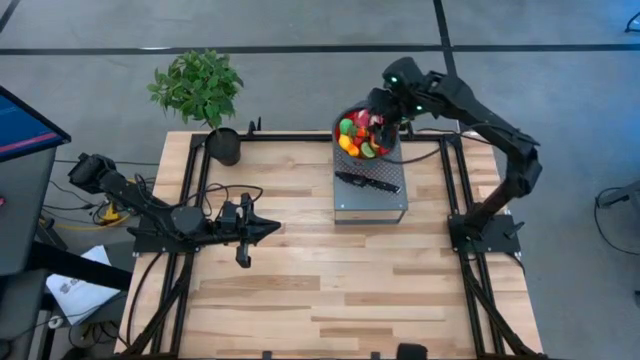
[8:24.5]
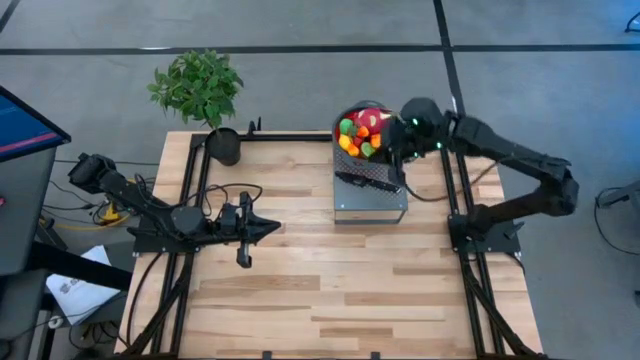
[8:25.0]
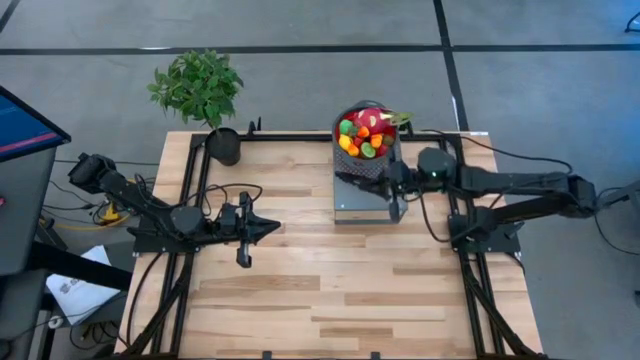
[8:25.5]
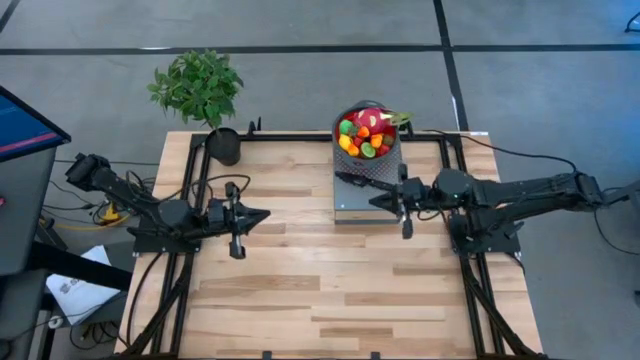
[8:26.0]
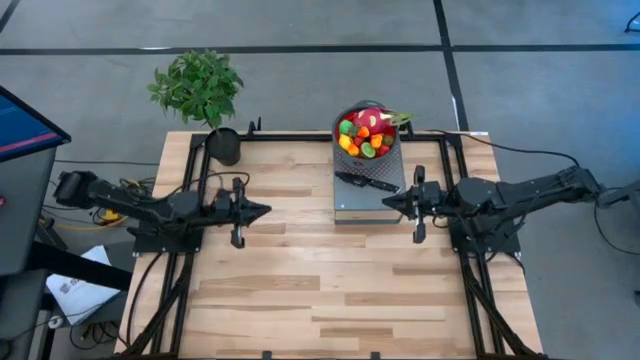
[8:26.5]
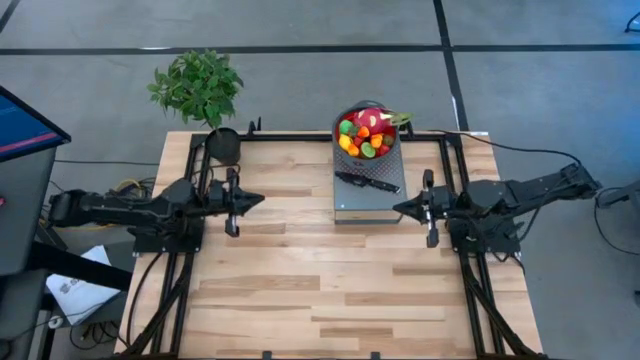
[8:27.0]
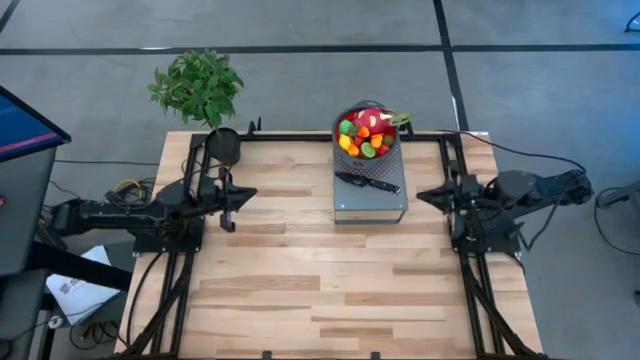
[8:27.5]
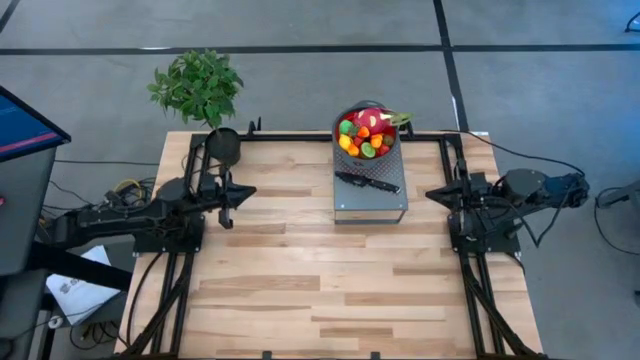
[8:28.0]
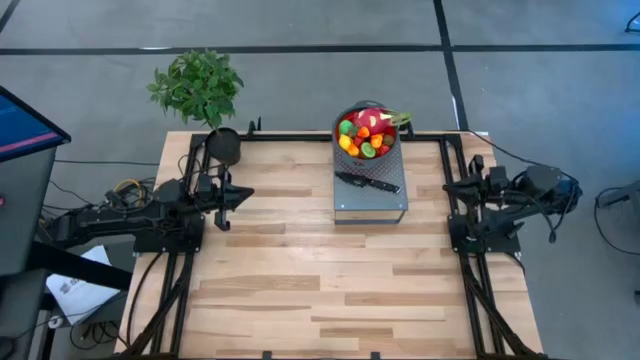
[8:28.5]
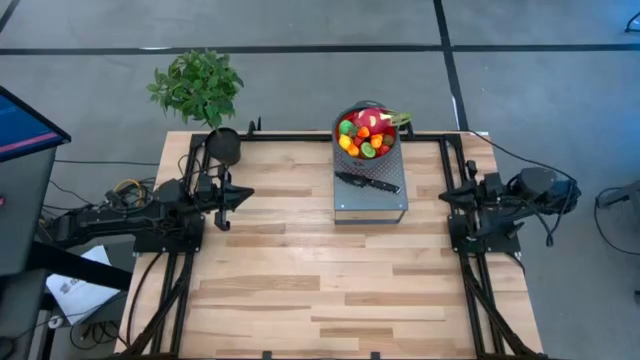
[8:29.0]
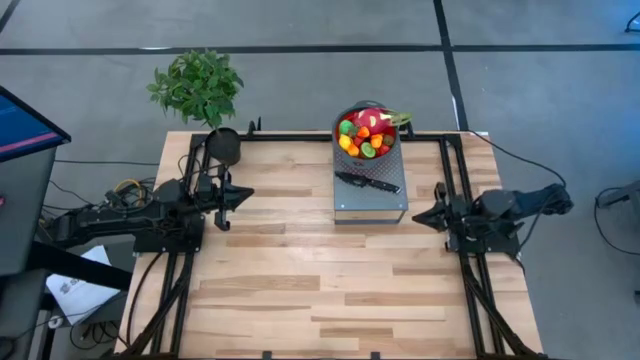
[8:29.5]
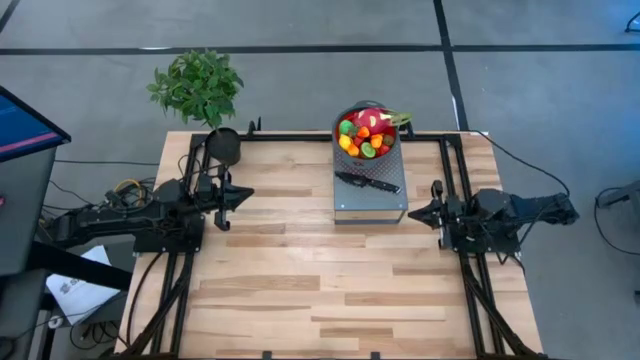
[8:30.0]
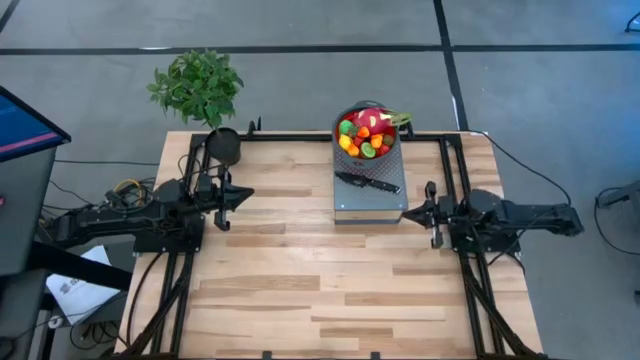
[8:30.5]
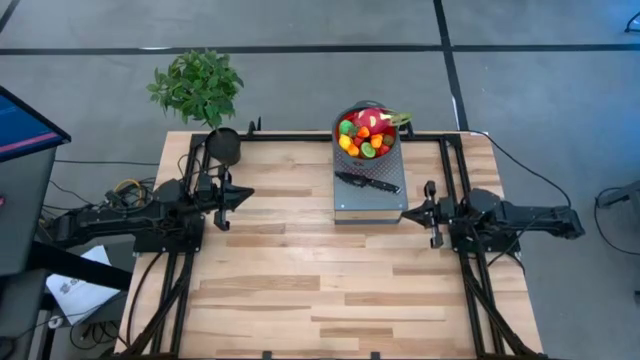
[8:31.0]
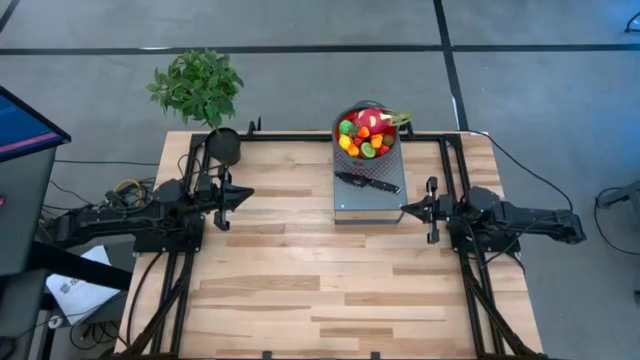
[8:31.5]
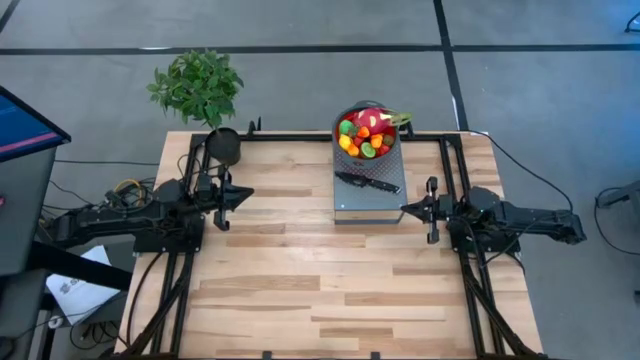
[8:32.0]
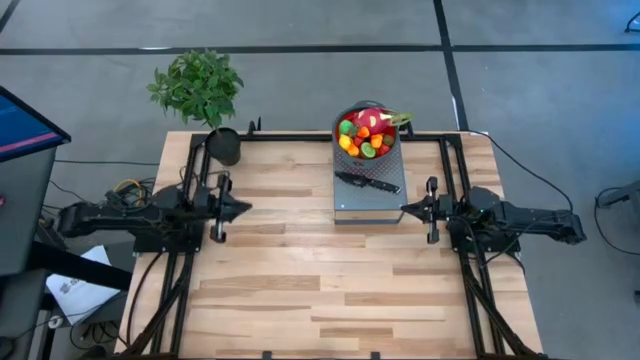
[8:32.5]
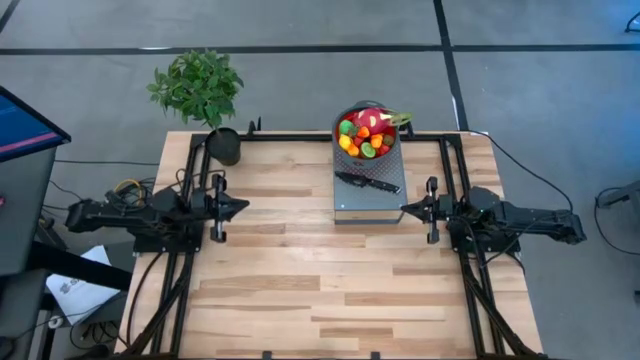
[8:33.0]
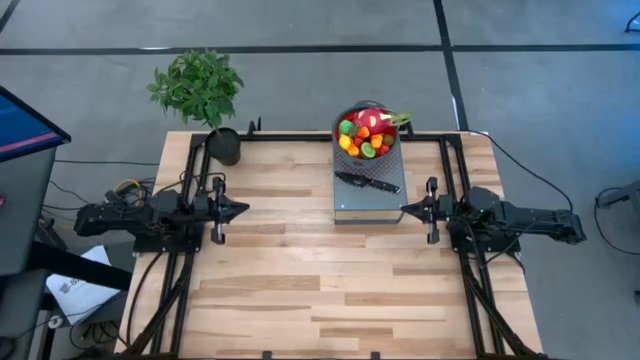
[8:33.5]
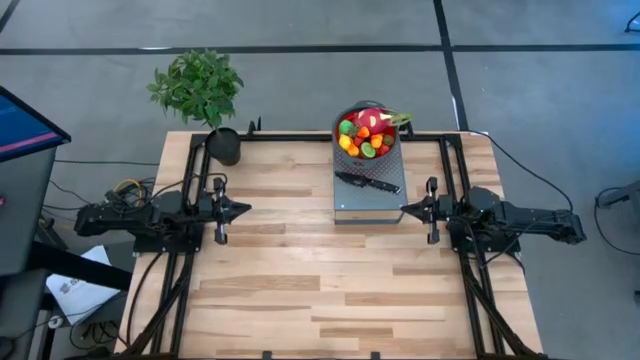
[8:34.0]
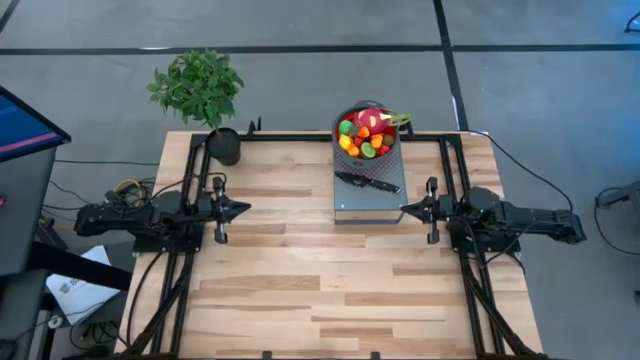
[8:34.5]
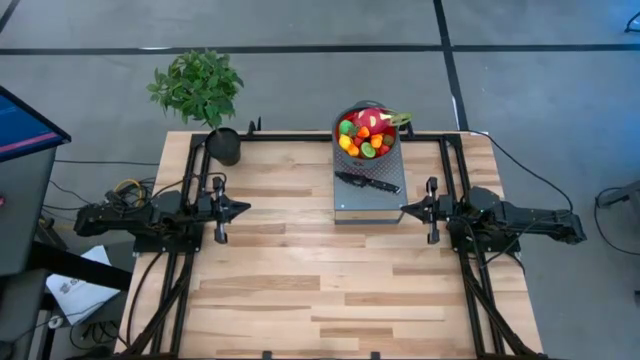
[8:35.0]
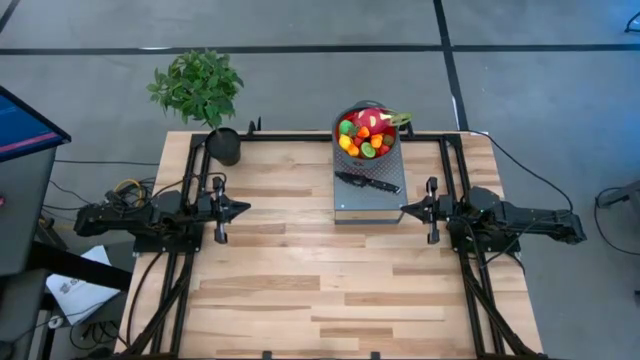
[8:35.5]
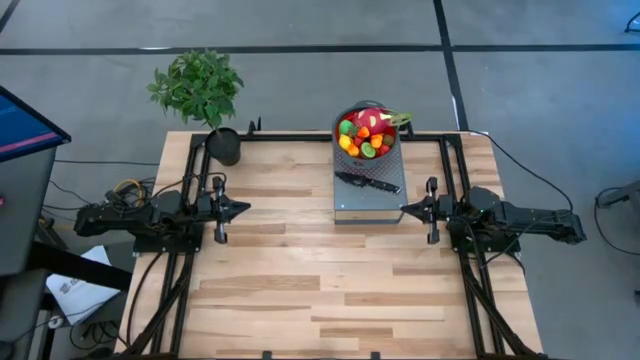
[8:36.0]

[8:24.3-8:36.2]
Task: Pick & Place Fruit
Return to Home Position

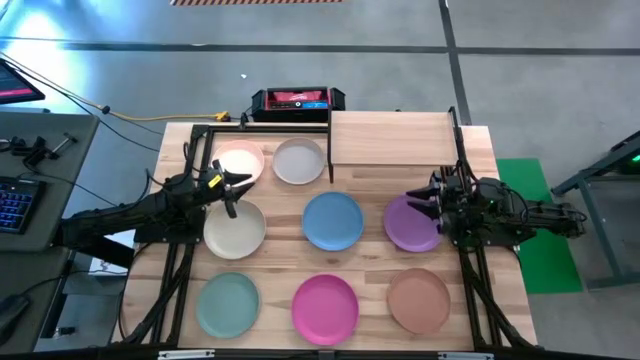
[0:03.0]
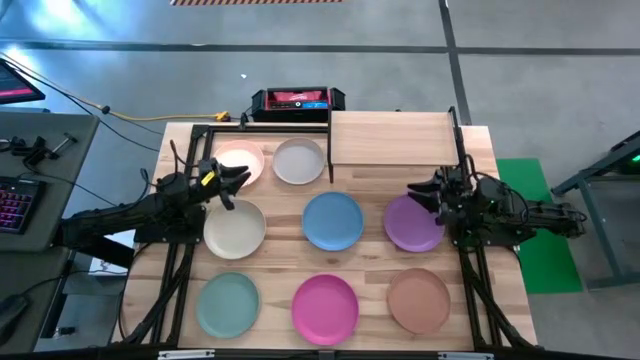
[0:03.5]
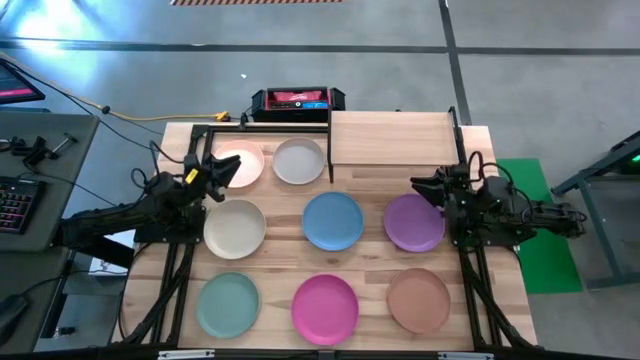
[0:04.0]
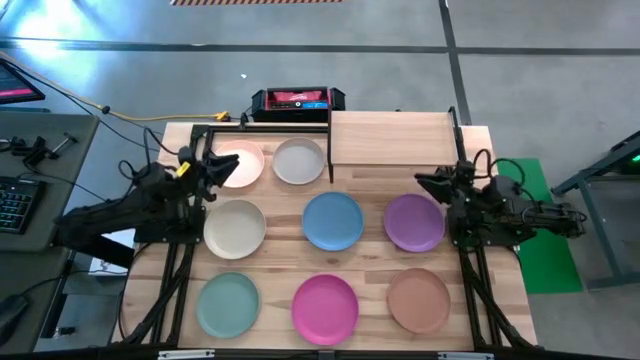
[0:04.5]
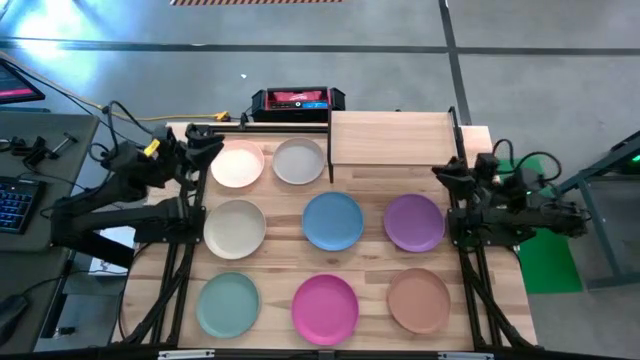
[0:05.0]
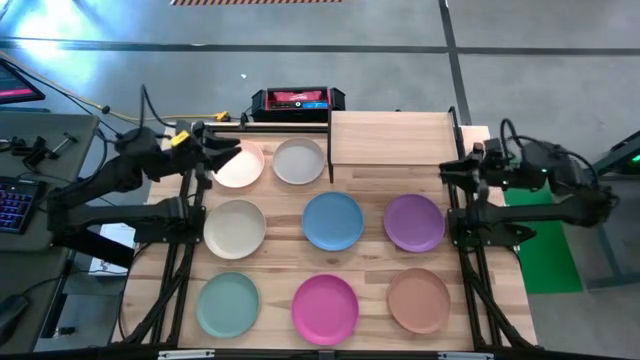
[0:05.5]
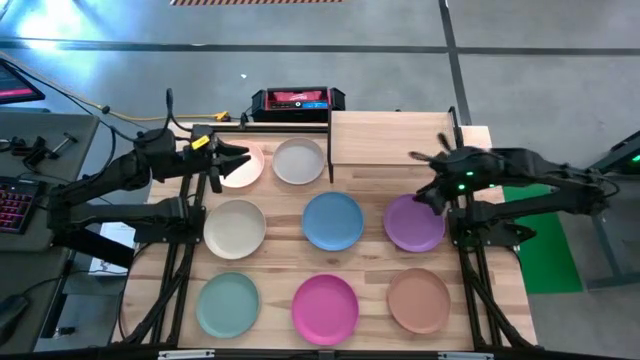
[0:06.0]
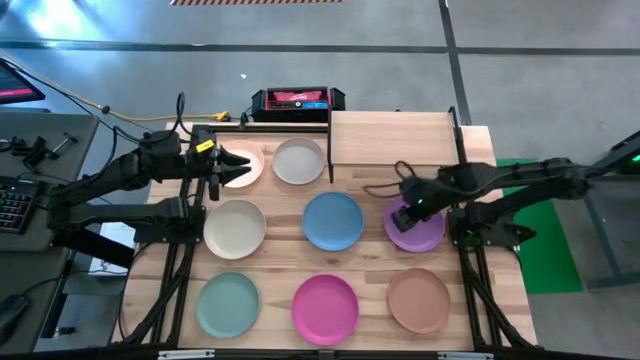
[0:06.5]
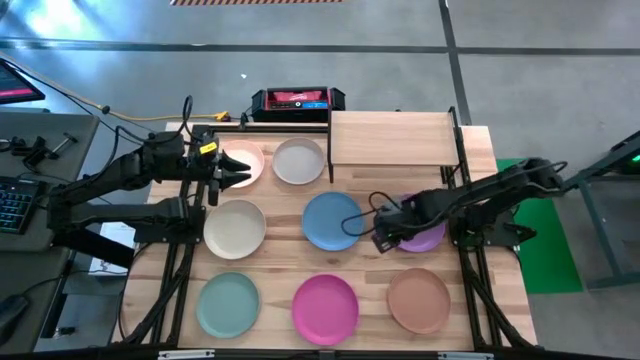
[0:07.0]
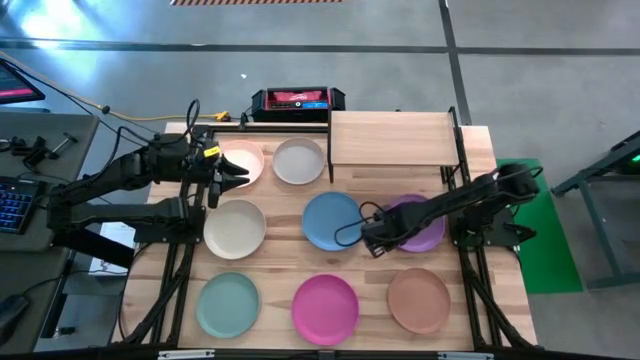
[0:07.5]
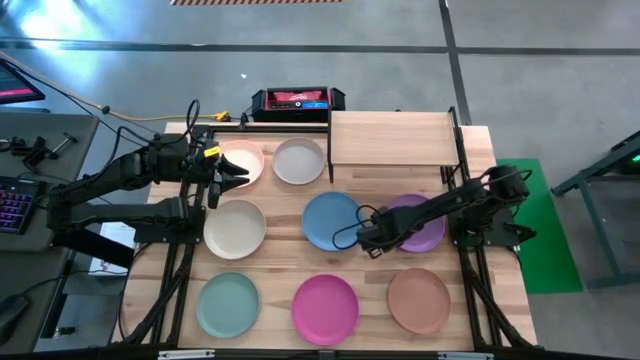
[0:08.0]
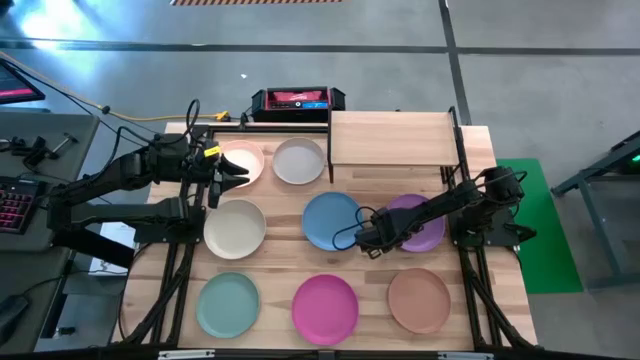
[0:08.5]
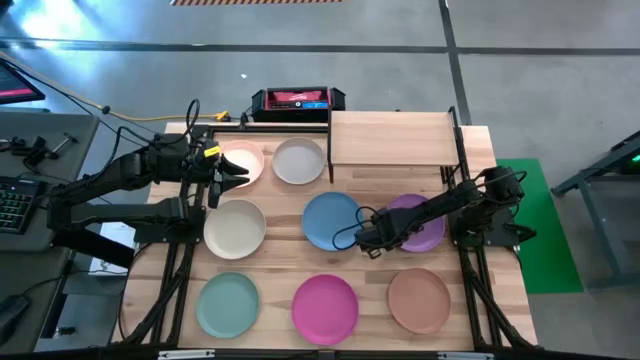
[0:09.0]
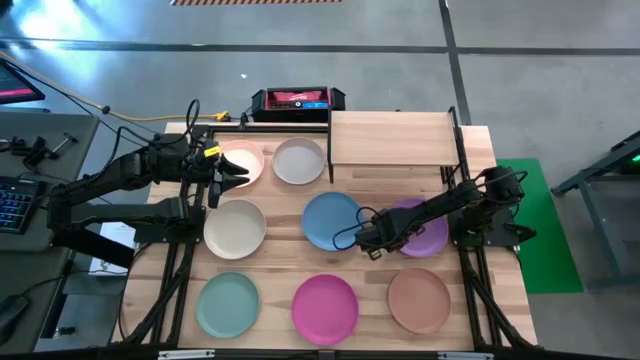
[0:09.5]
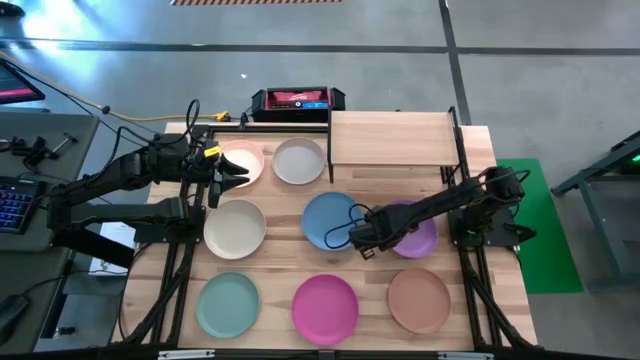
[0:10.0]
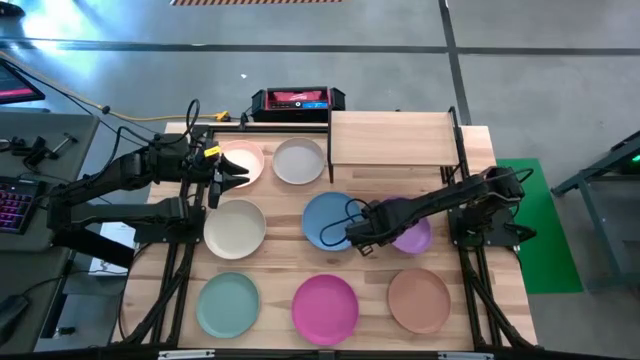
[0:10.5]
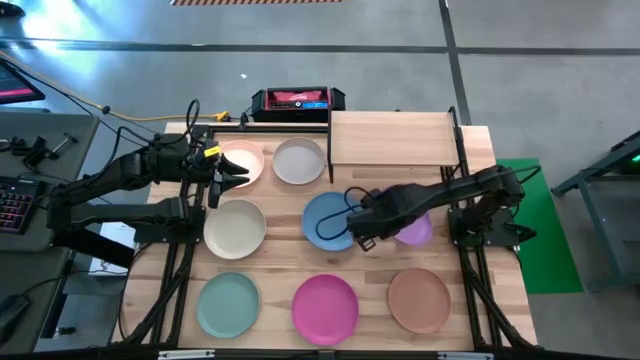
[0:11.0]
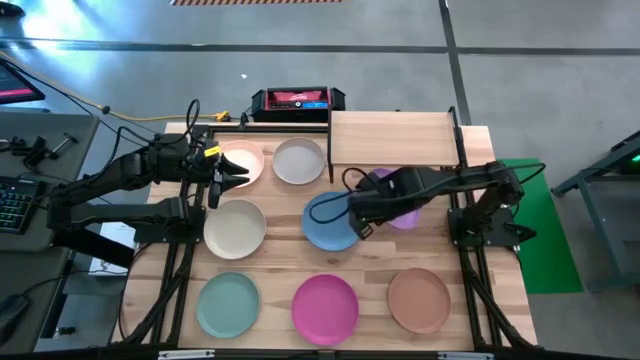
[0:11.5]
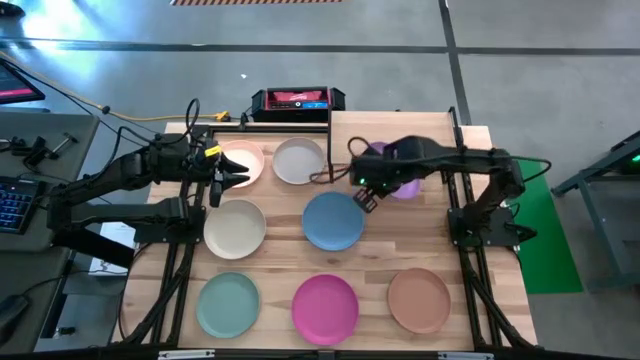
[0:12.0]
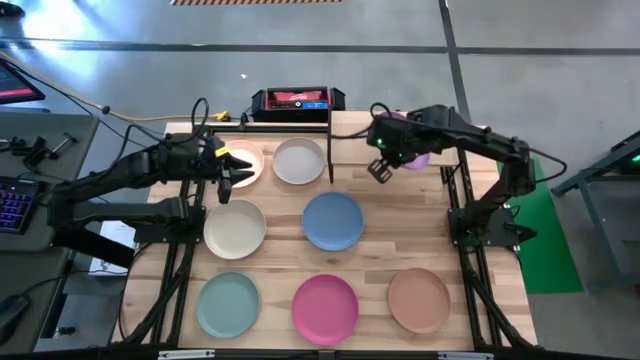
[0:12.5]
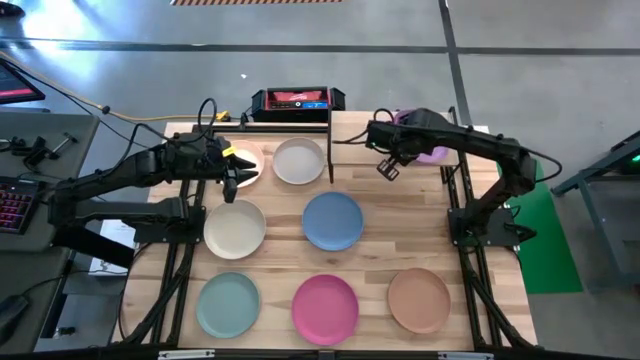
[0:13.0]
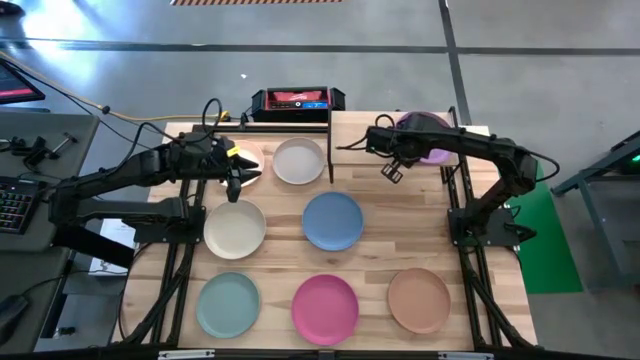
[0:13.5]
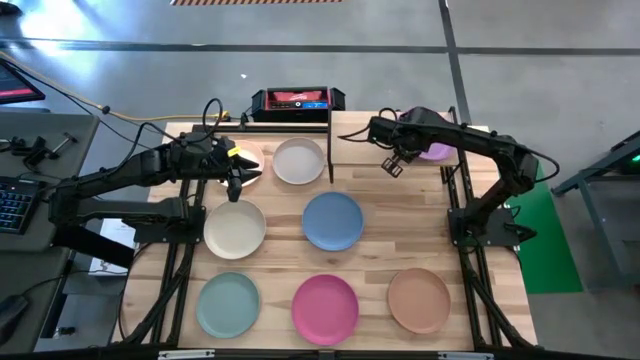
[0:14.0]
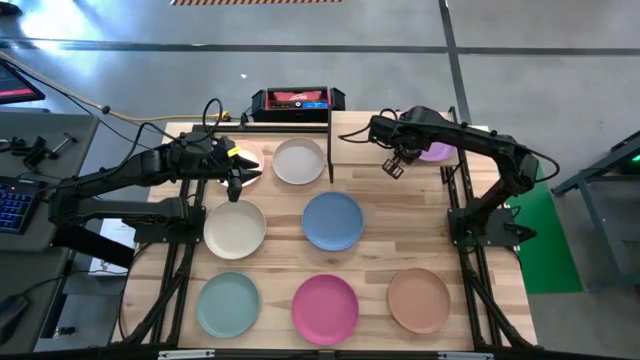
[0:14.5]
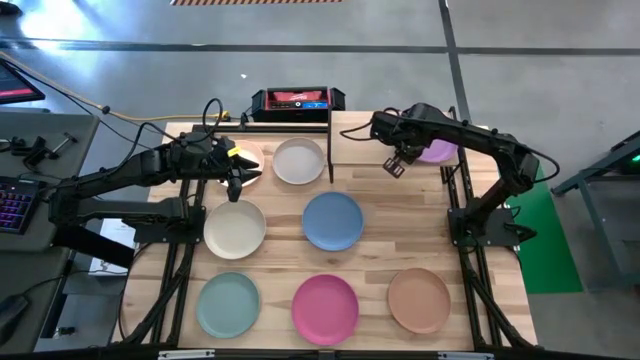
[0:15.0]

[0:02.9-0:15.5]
Task: Place and stack plates onto a shelf
Put the purple plate on the shelf
